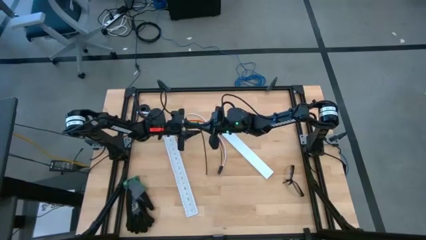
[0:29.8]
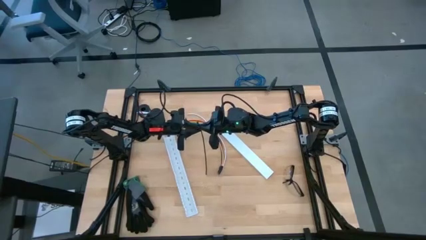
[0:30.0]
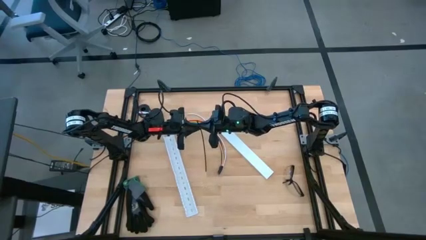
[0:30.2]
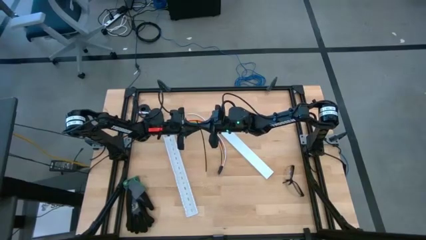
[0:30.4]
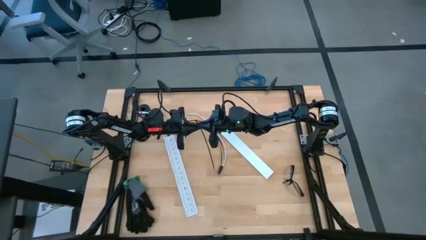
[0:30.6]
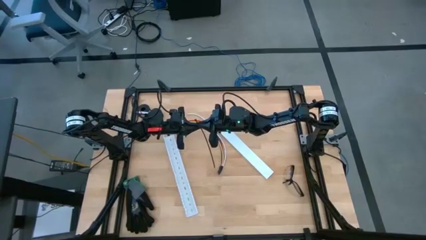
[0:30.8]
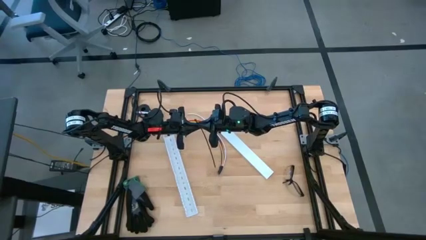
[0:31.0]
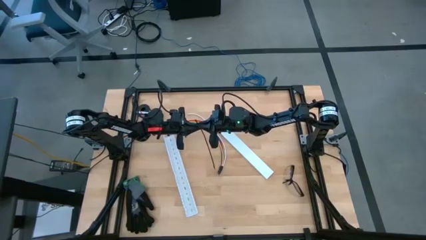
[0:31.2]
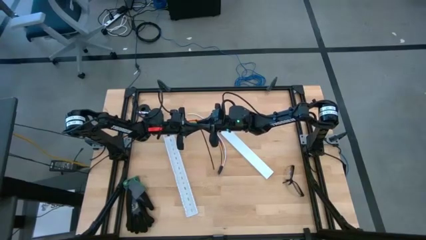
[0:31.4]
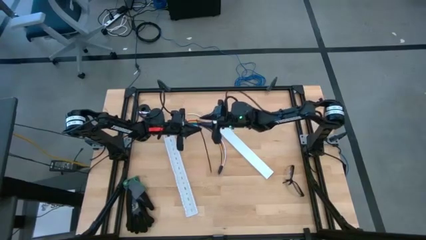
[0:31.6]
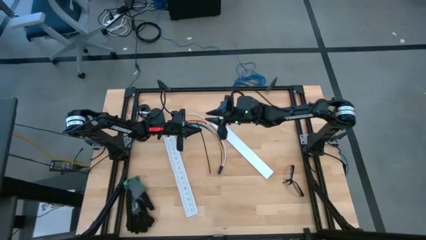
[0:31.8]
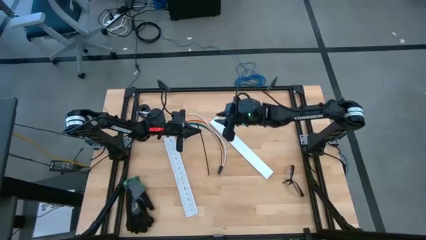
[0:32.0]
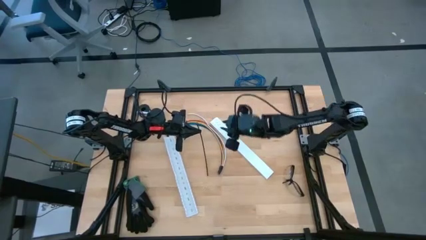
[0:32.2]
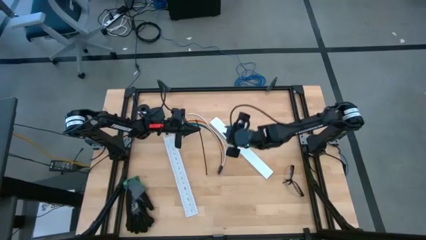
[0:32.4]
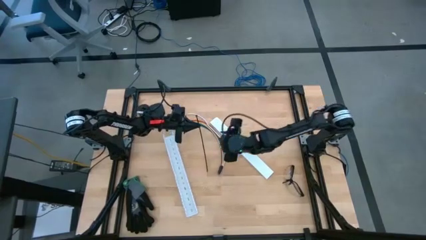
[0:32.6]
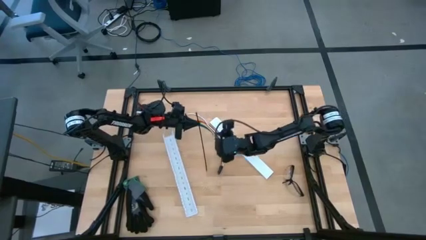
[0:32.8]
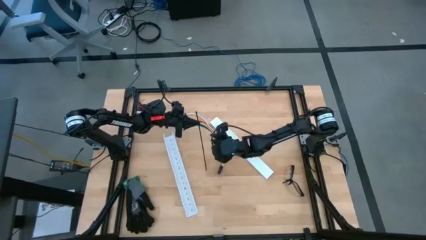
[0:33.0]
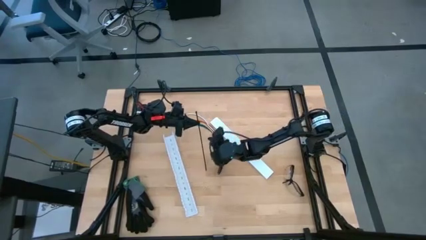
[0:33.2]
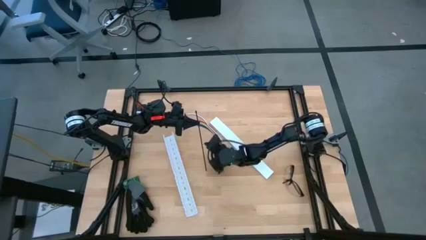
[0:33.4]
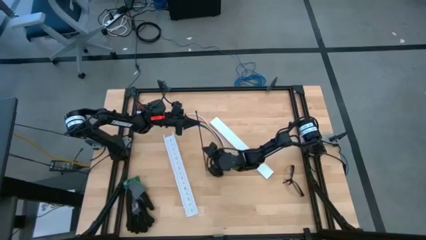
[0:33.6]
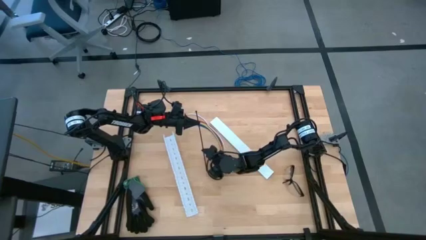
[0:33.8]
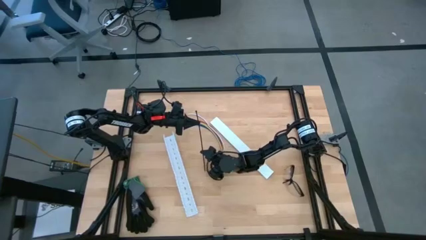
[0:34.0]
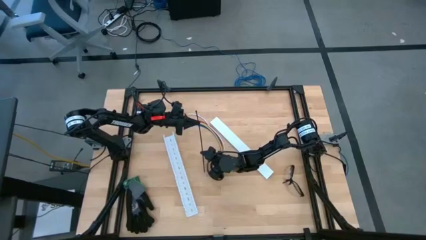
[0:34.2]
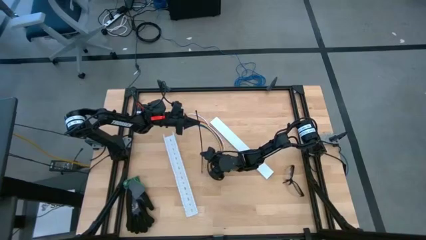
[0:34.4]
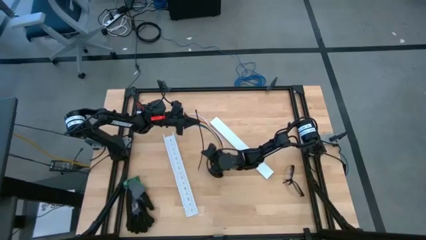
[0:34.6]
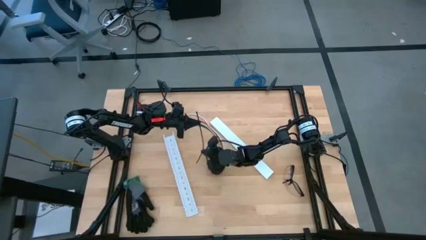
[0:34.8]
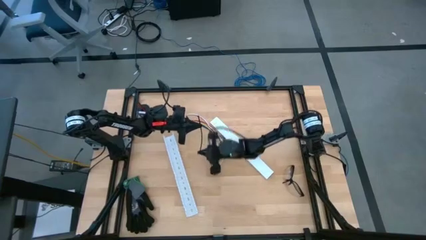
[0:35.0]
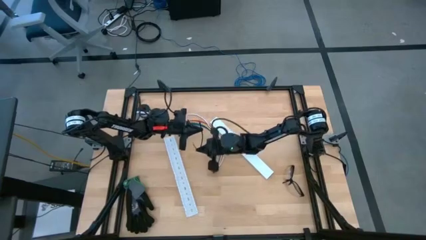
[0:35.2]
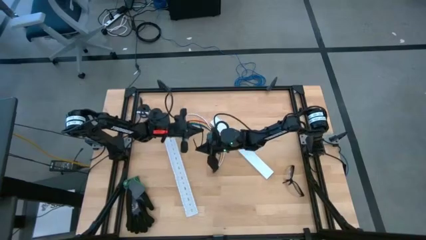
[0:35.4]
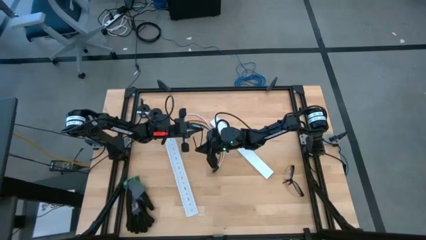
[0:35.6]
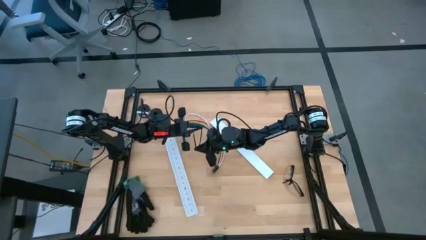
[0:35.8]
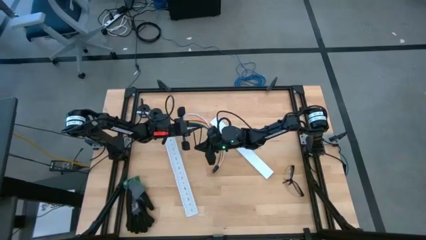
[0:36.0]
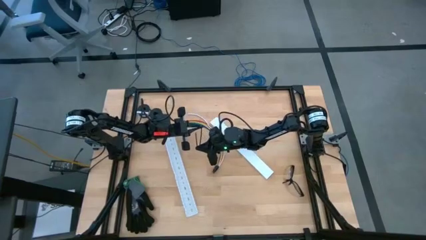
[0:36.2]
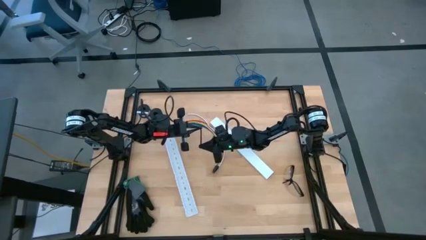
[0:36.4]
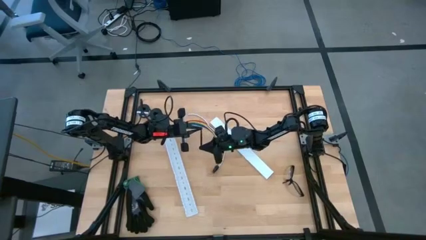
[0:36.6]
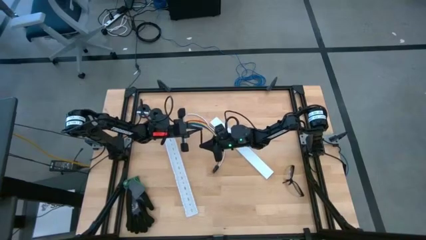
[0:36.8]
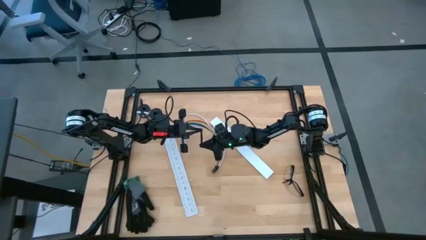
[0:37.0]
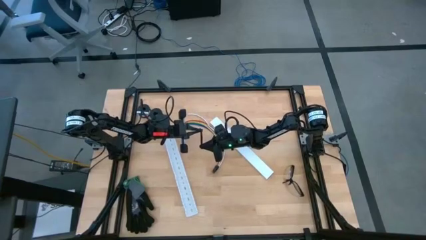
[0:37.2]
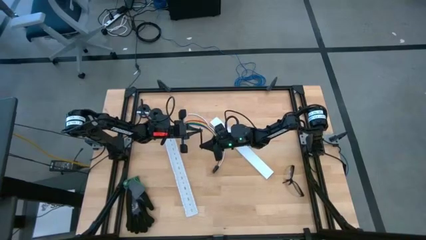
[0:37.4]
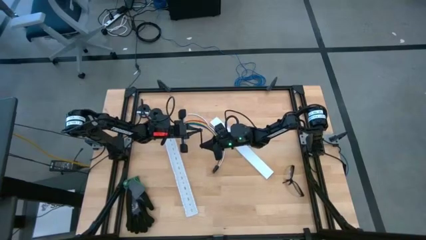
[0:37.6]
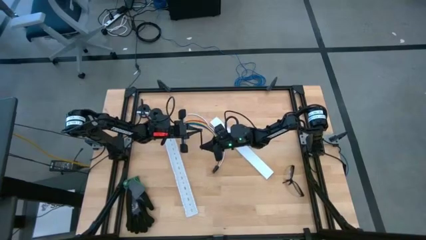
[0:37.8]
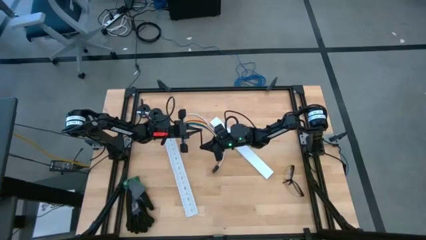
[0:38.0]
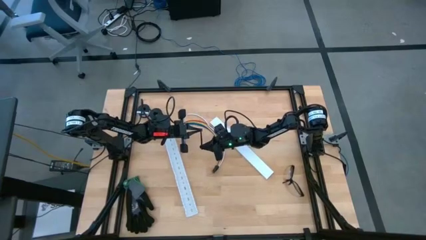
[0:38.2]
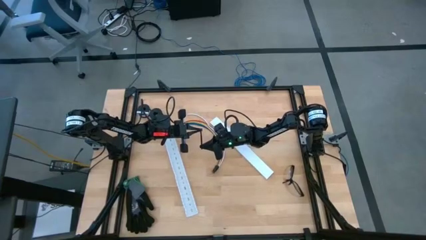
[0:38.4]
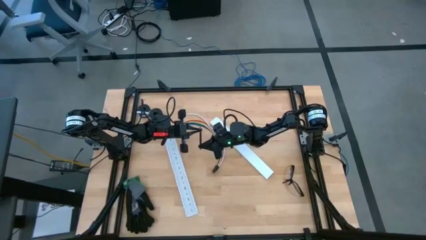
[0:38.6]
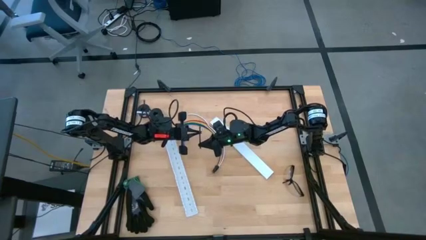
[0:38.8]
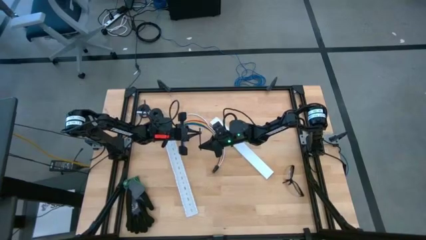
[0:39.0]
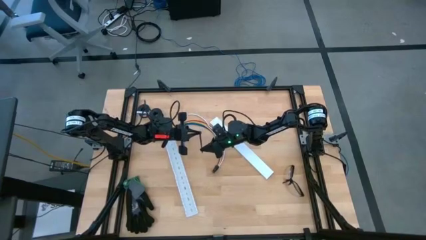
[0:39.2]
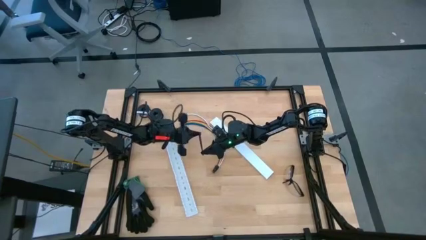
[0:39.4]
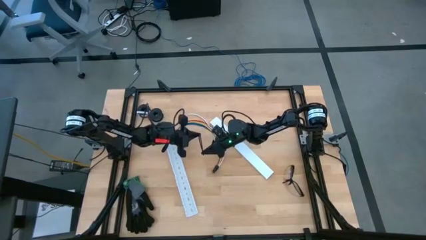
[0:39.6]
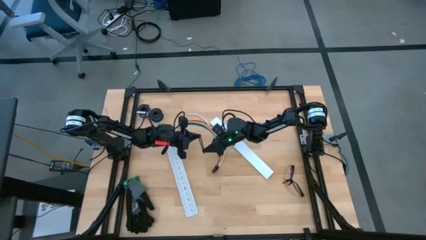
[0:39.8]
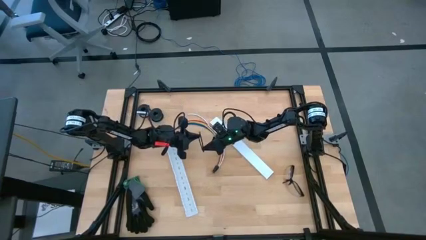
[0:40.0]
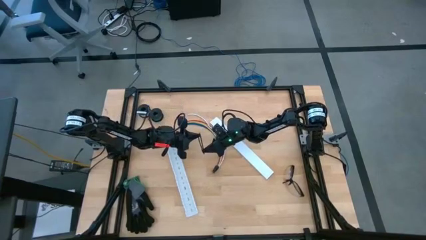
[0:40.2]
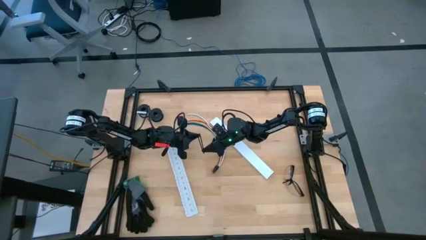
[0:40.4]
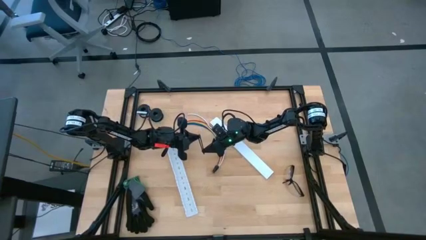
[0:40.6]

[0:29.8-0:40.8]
Task: Ziptie cables
Wrap the cables together using the black zip tie

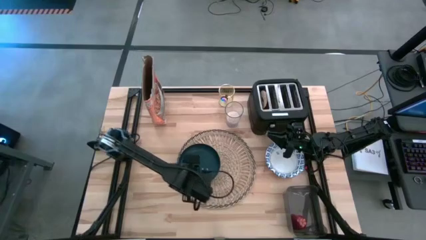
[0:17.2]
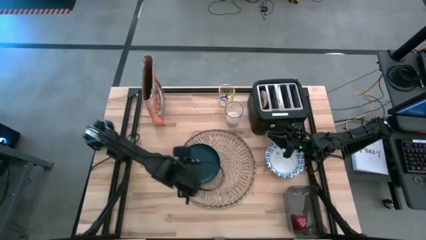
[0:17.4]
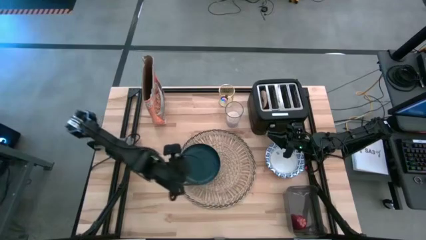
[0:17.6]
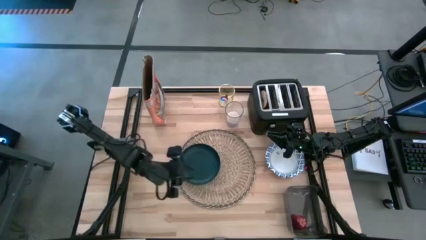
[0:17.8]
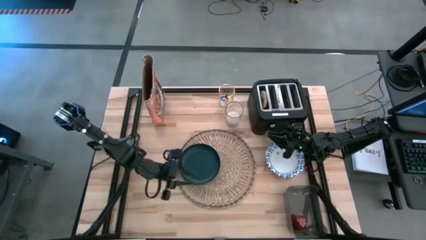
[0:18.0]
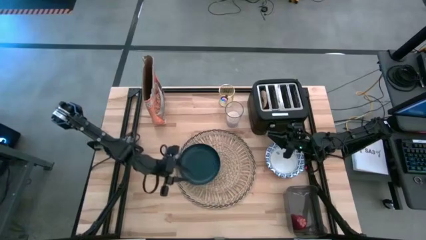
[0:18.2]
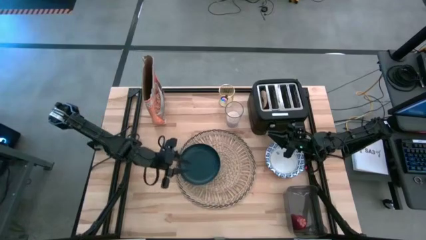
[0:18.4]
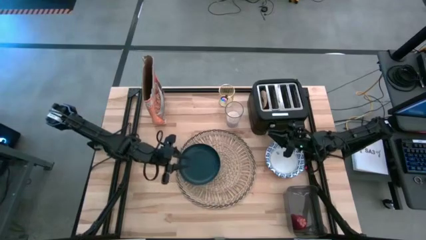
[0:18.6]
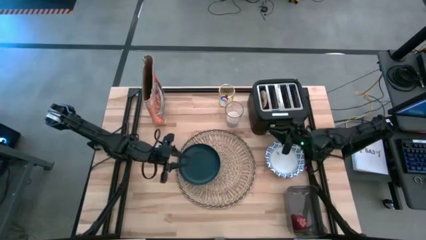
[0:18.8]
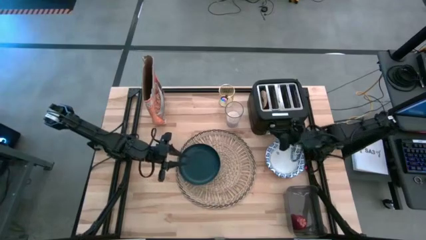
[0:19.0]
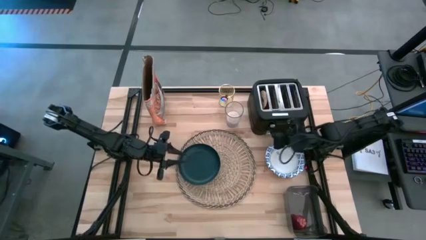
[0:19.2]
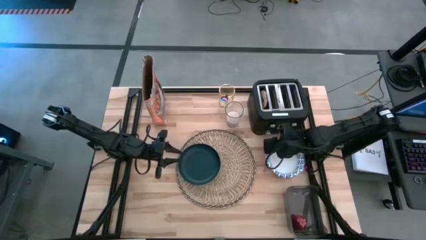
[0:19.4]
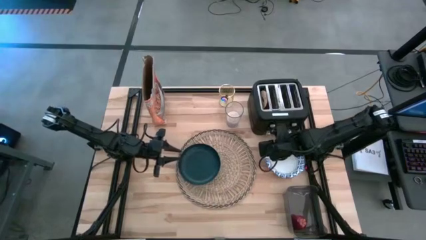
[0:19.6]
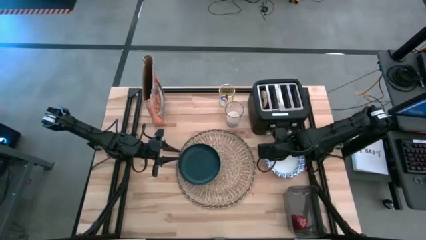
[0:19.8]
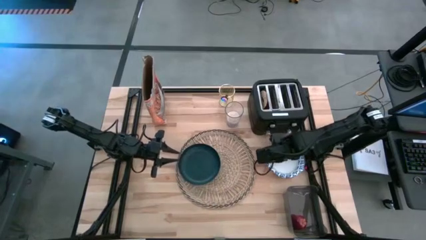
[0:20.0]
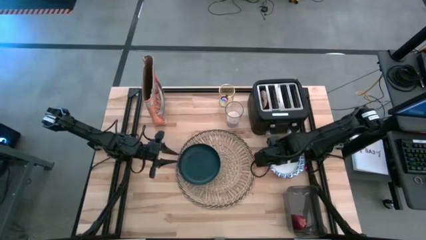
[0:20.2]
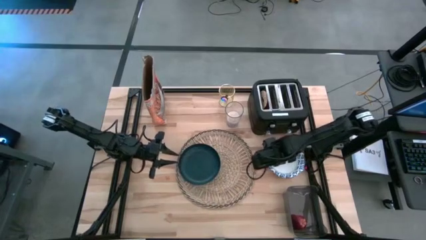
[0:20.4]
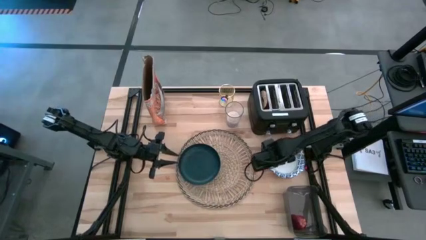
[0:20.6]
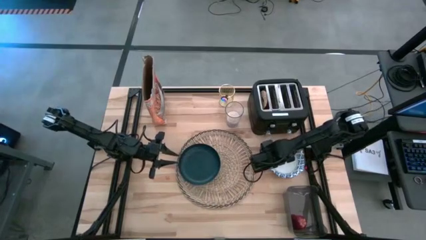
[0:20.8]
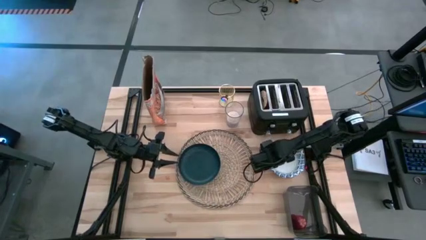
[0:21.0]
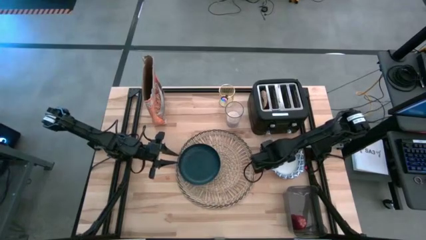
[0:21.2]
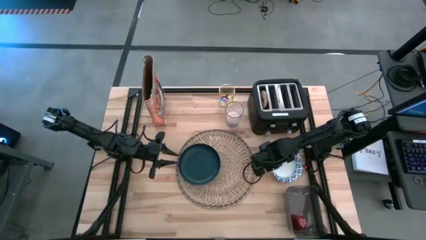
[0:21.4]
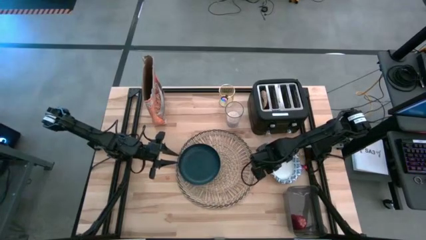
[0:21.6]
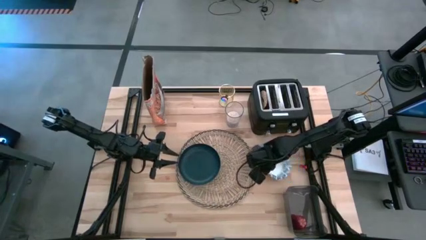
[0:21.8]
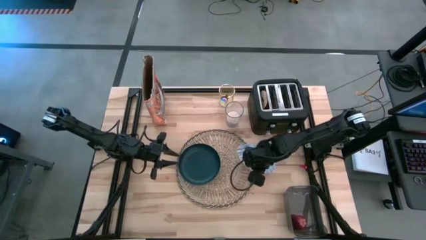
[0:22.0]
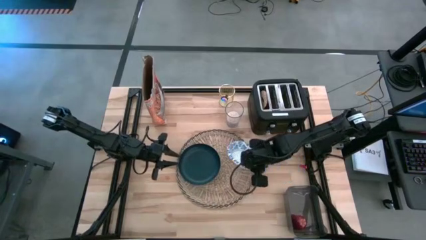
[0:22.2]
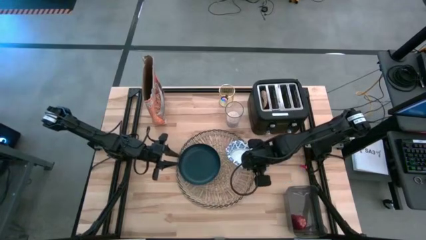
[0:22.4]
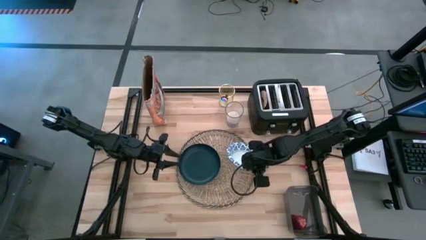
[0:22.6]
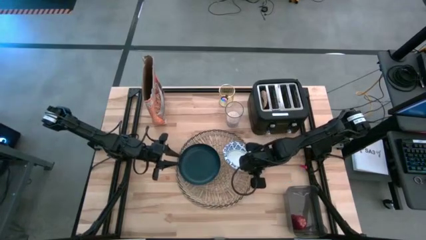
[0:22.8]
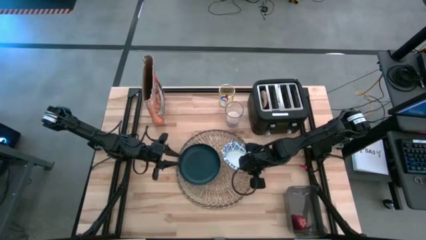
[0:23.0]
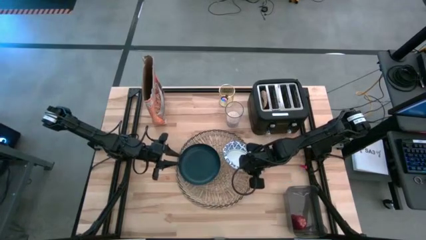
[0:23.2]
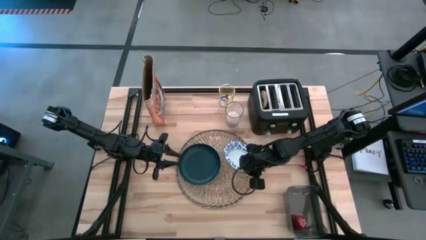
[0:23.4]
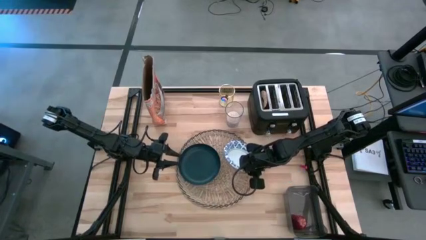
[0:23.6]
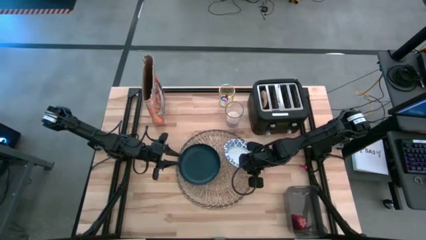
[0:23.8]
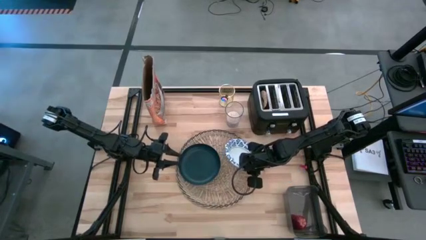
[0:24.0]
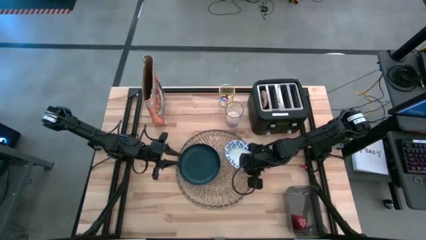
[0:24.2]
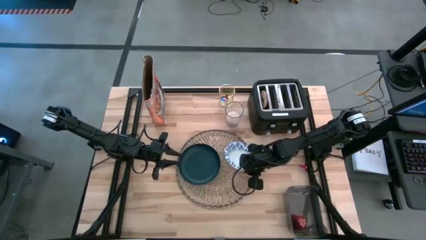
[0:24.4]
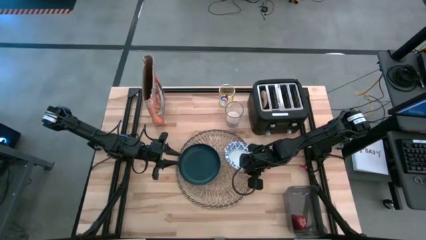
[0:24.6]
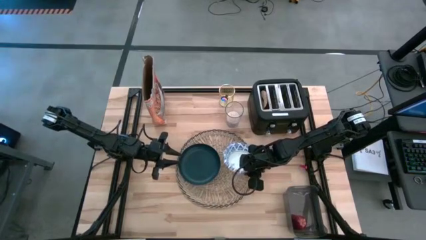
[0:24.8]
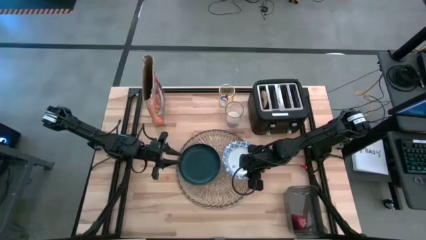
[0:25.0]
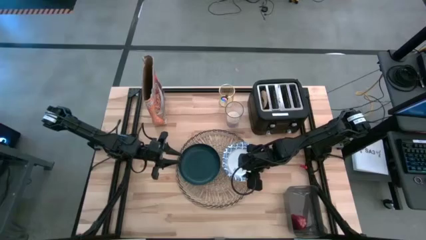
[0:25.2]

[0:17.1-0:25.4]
Task: Arrange a breakfast setting
Put the white patterned bowl on the brown placemat
